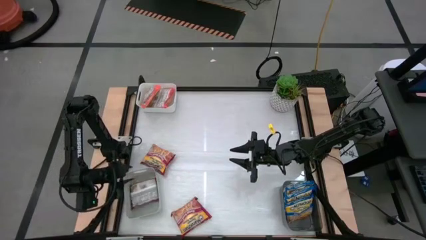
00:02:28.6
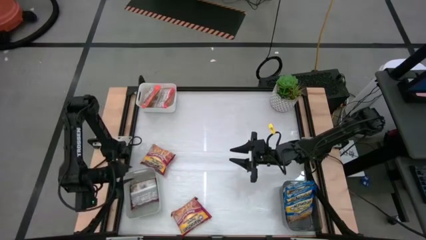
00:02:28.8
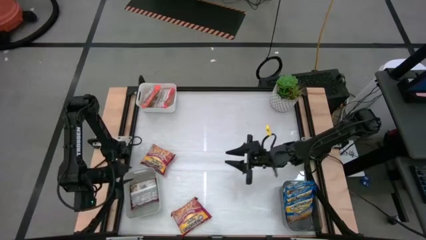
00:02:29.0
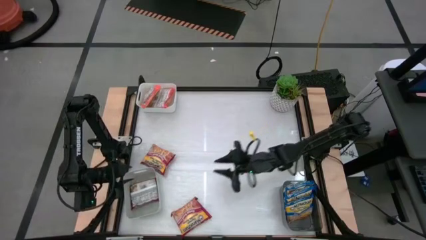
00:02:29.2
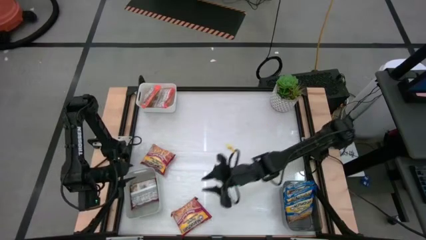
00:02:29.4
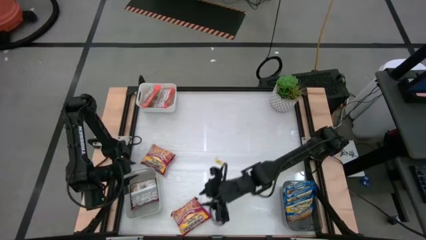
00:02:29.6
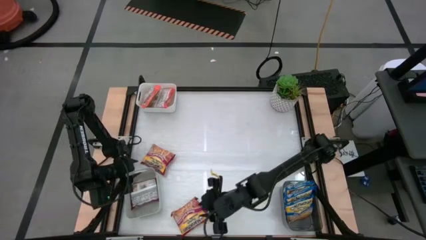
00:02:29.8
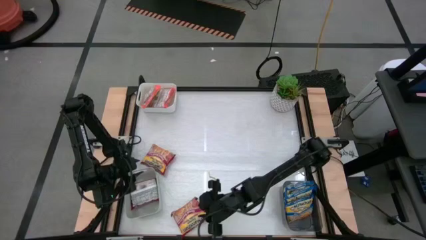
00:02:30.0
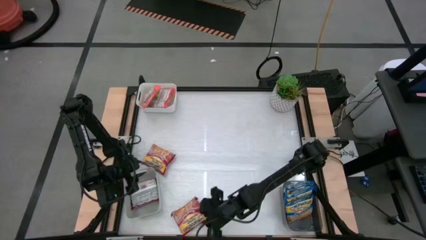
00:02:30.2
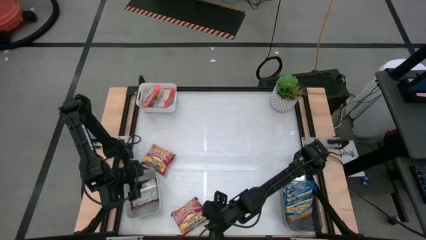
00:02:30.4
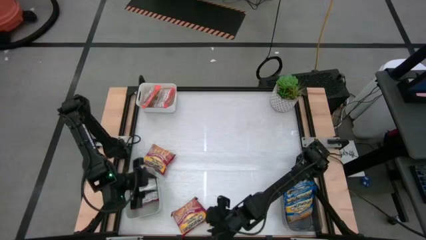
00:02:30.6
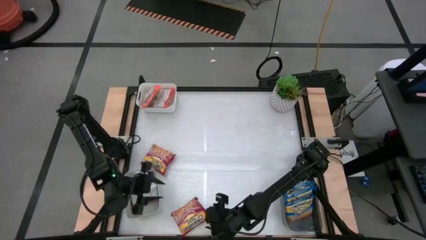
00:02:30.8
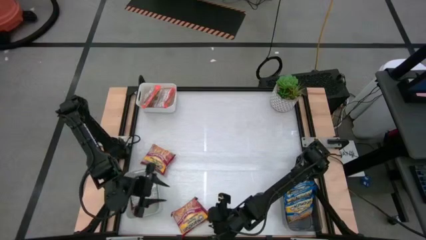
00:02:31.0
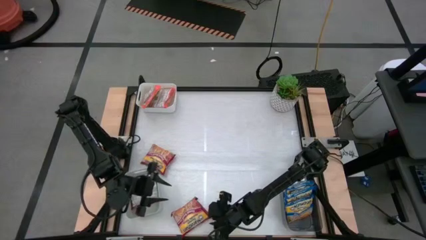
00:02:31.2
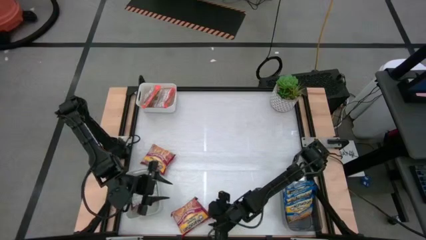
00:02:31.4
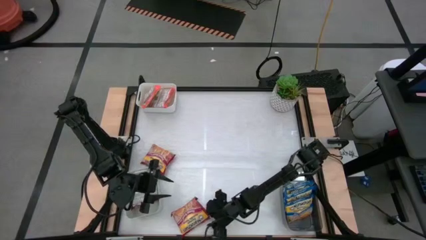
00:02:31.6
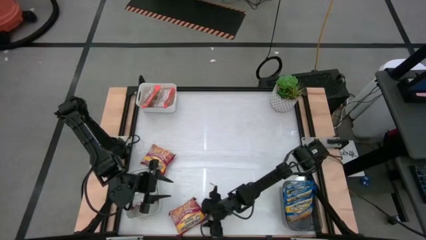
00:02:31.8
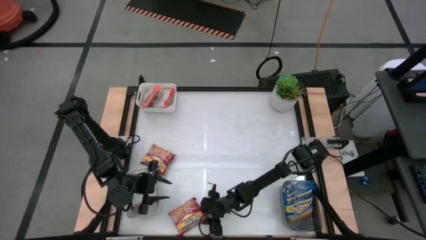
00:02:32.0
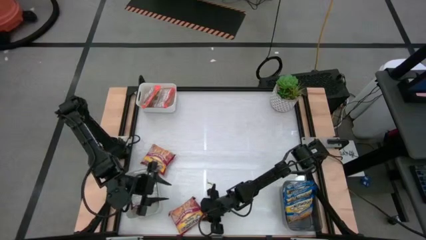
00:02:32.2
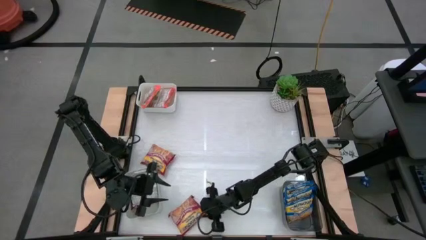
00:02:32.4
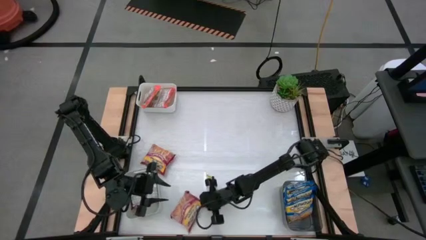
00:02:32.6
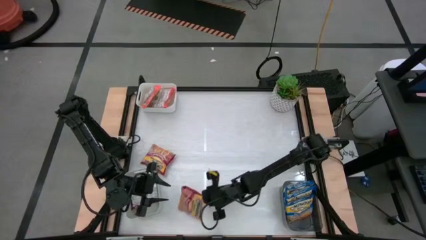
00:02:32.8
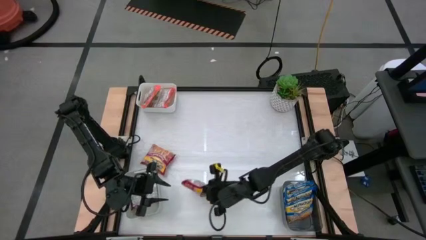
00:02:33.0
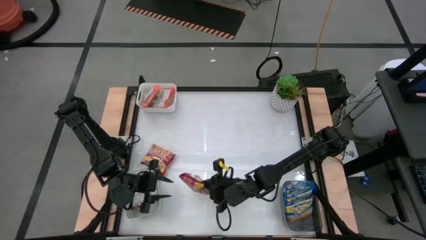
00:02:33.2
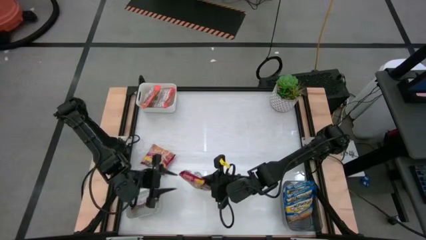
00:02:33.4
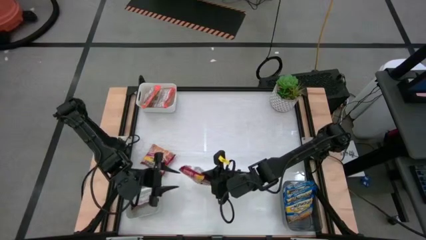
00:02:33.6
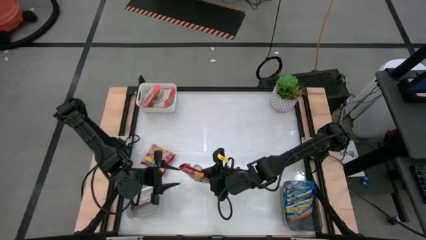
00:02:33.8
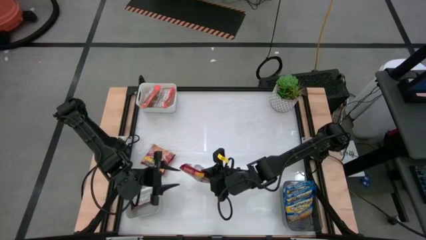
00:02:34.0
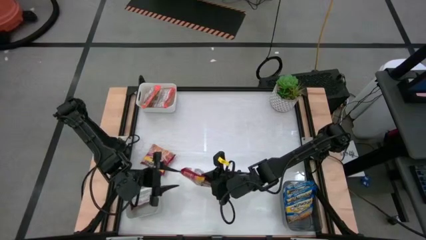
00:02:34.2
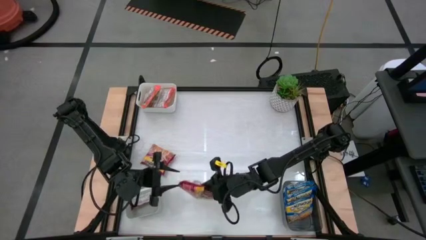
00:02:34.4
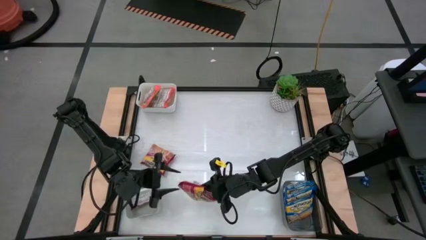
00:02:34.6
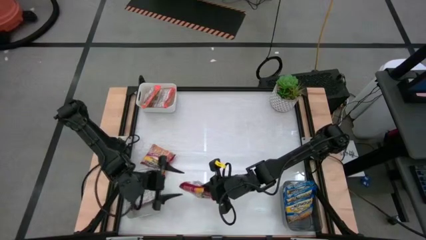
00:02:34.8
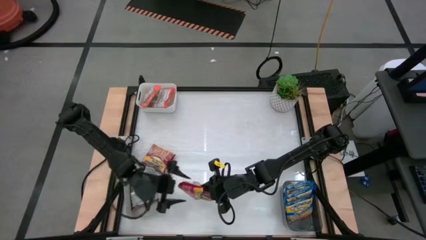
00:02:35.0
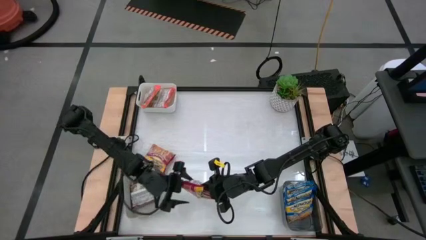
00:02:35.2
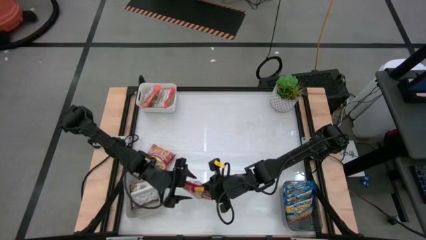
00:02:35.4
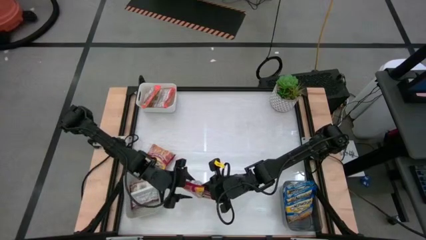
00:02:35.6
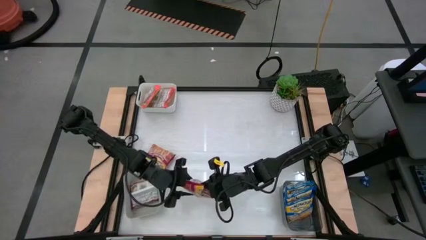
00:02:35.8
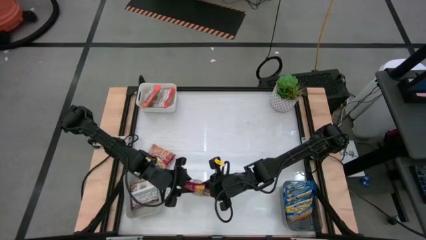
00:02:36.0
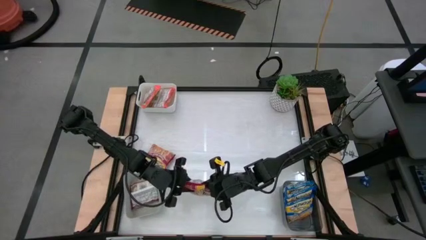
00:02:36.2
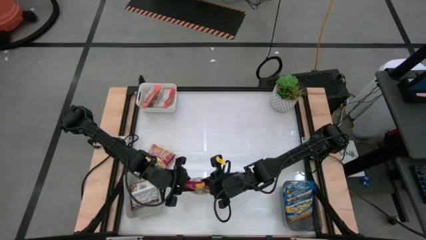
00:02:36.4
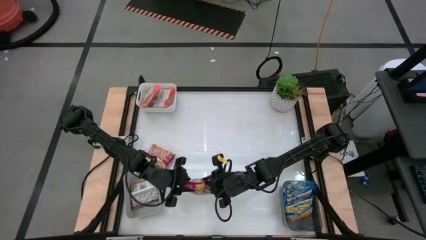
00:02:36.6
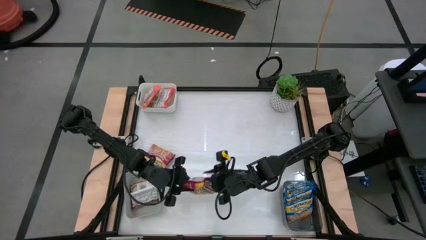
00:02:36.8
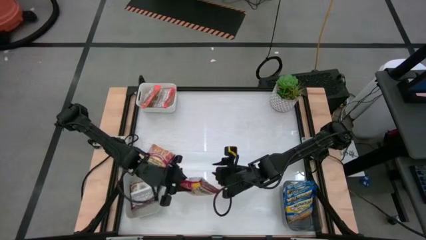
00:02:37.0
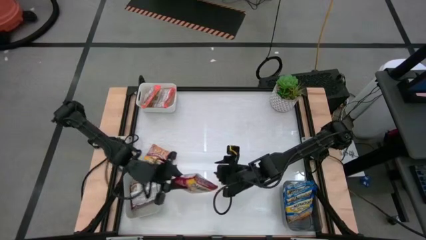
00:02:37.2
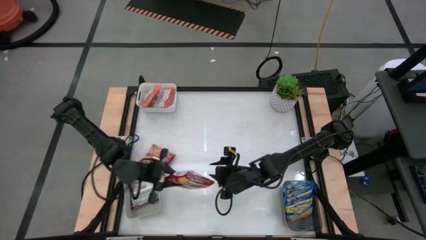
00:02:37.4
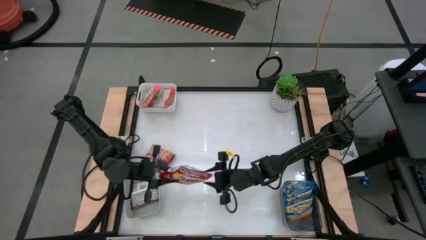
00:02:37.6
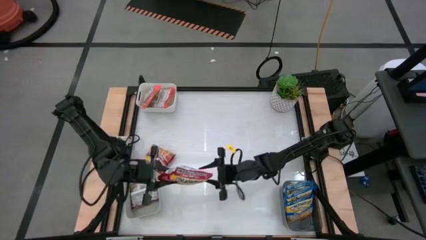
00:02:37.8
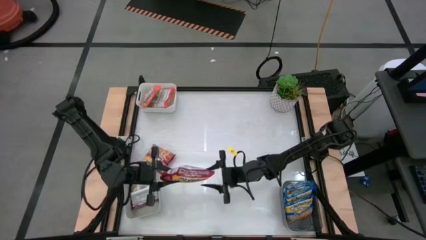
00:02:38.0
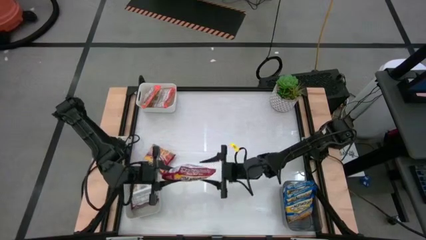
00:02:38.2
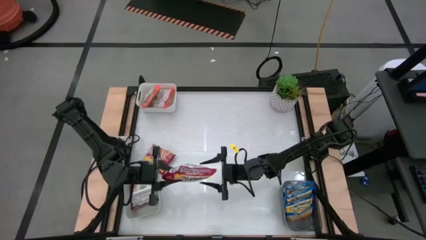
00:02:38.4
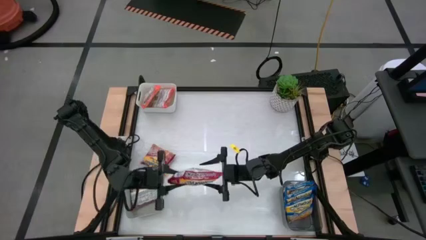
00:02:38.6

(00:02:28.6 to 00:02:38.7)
Task: Sort Maruchan noodles
Put the bottom red noodle pack into the gray bin

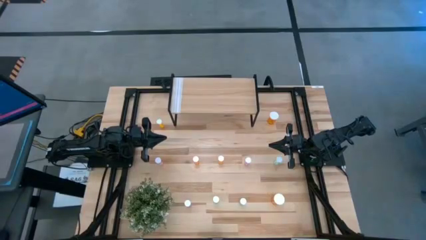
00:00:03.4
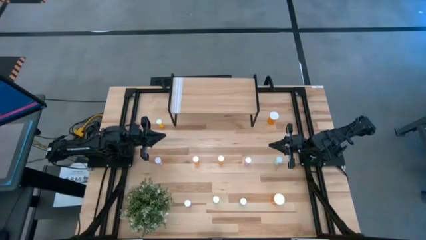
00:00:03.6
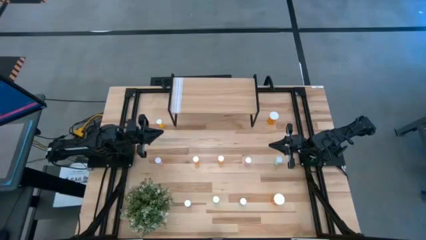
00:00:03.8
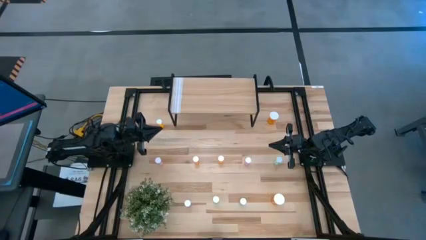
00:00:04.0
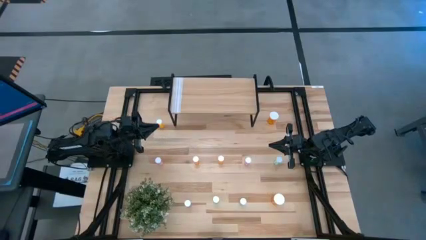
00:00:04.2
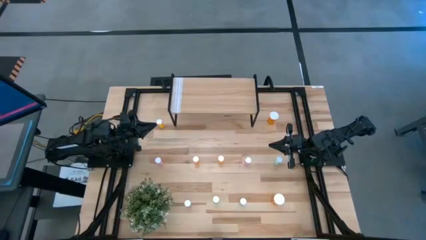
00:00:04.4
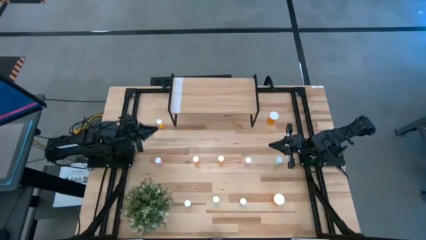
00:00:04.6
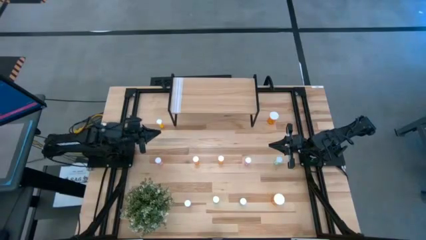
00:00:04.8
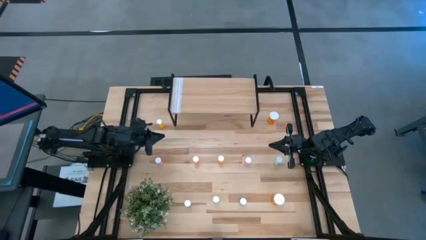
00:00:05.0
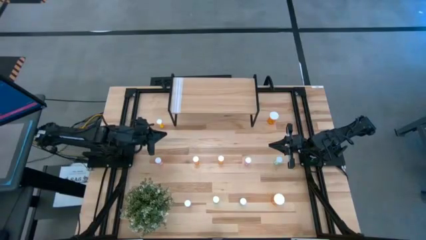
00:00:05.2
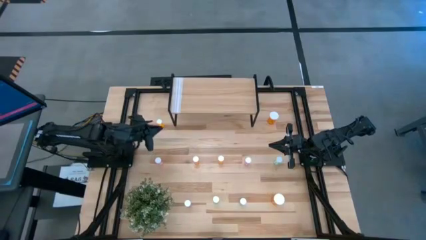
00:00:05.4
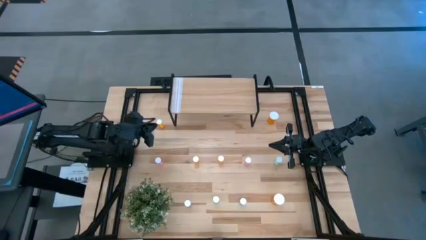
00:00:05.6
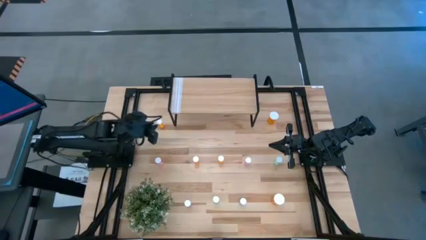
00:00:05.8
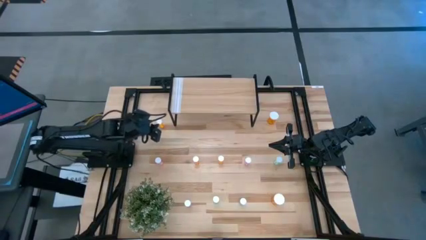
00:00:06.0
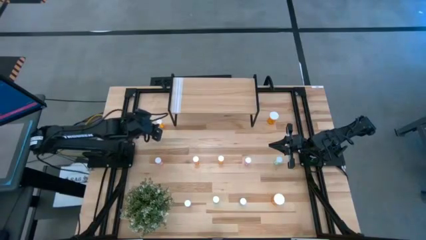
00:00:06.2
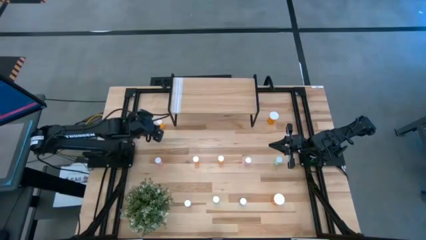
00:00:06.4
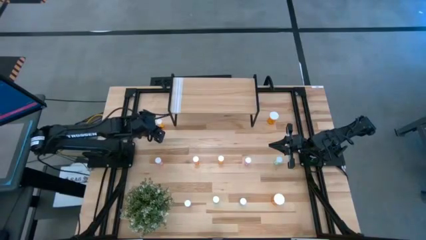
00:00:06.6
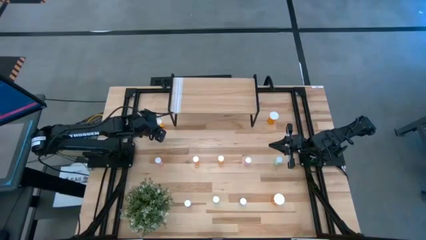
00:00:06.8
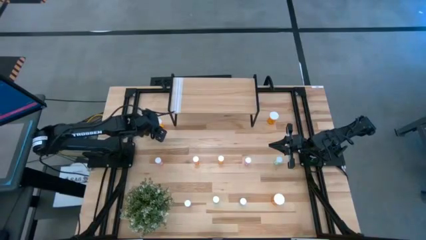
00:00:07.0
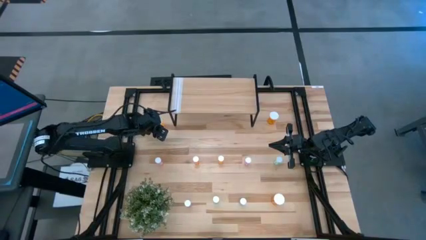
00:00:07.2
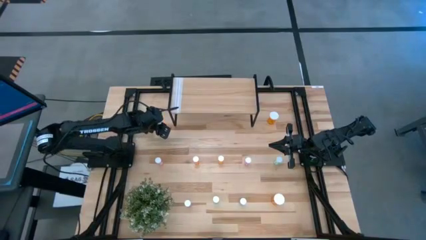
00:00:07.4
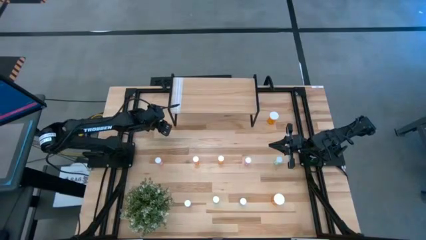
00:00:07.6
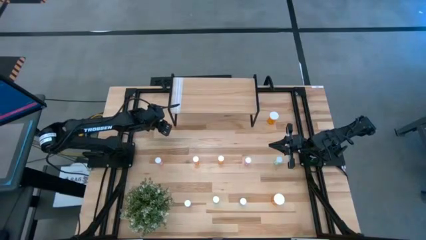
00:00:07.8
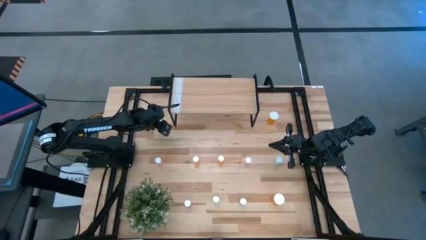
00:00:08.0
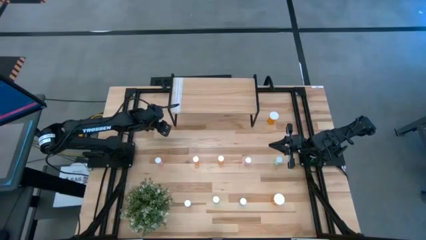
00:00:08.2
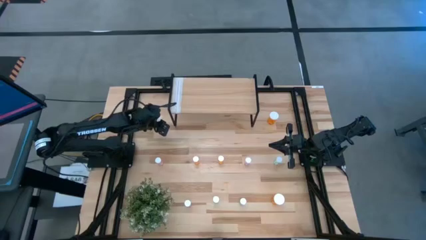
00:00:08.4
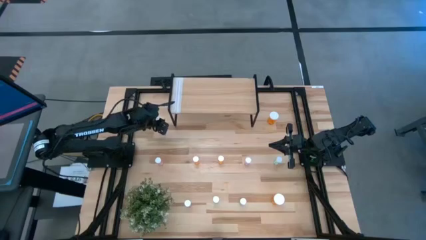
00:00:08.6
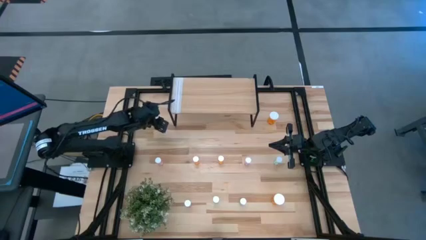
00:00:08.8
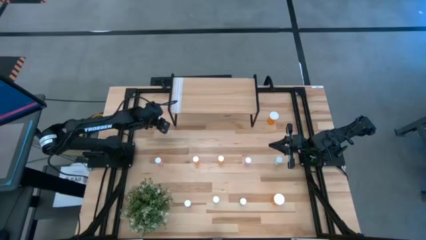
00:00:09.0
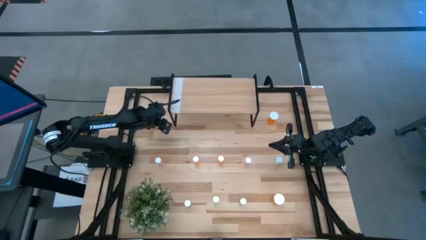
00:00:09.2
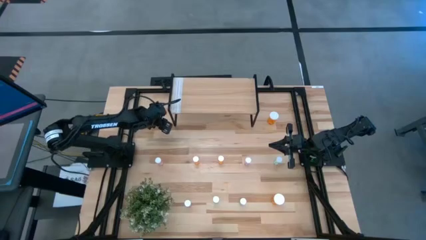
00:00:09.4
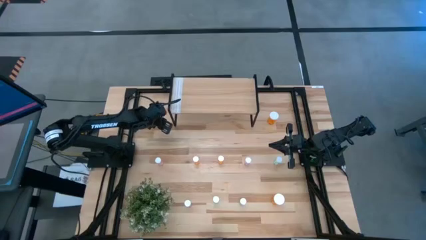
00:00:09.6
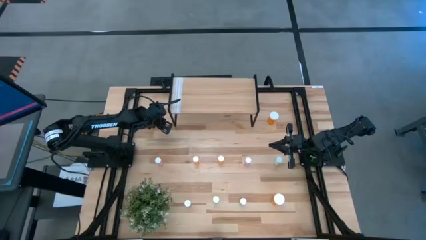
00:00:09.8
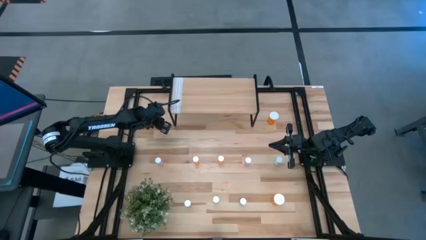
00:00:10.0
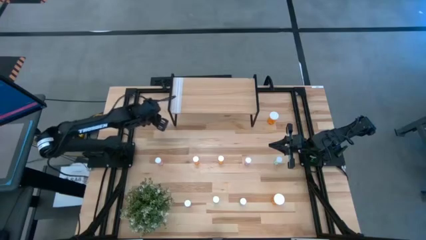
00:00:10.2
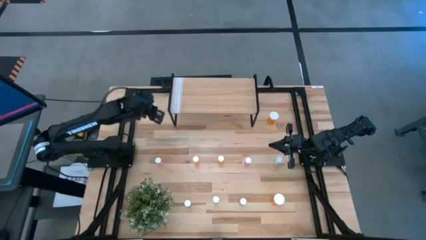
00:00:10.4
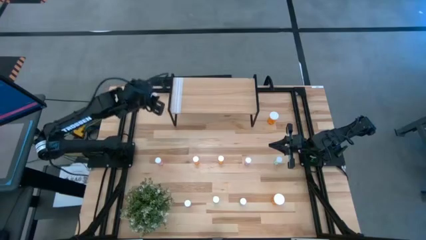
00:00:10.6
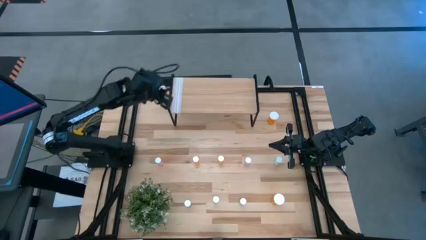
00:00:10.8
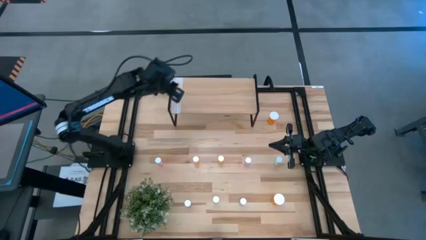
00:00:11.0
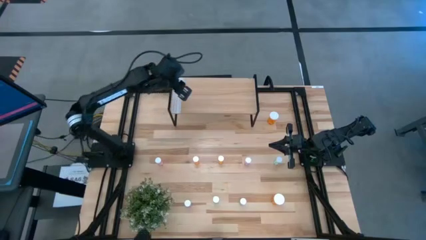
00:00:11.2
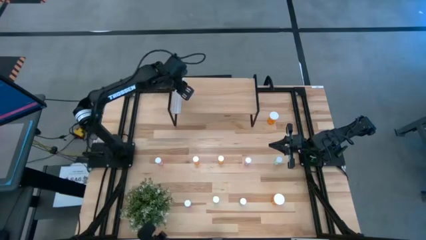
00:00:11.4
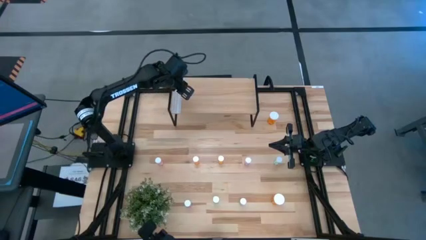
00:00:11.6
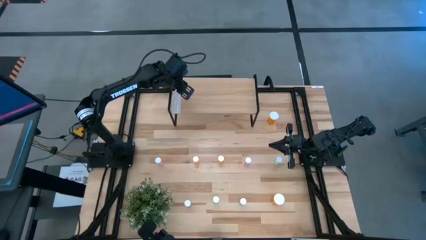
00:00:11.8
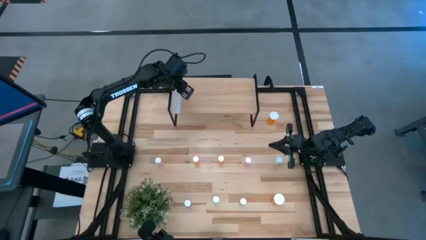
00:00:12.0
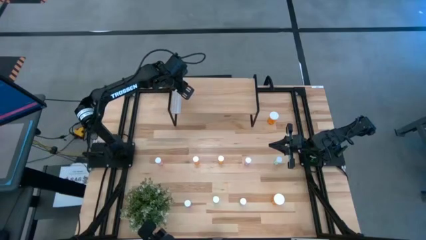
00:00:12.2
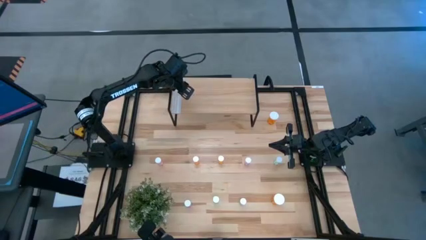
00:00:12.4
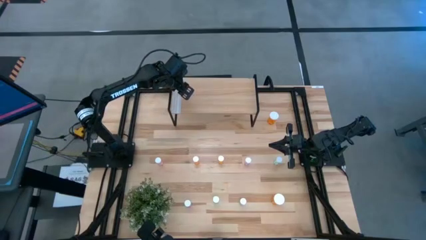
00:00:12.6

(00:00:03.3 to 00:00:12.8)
Task: Pick and place medicine bottles onto shelf by color
Put the top small orange pill bottle on the shelf
